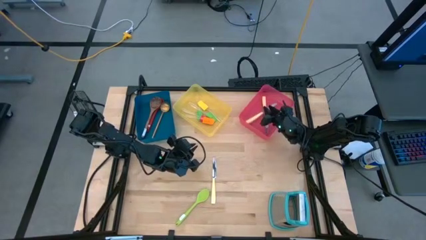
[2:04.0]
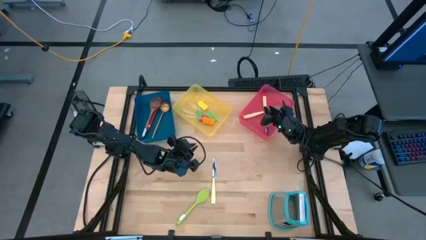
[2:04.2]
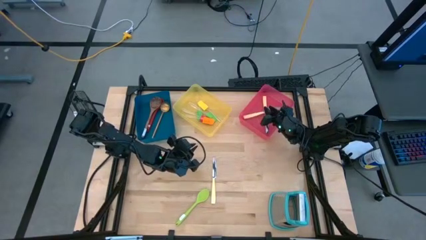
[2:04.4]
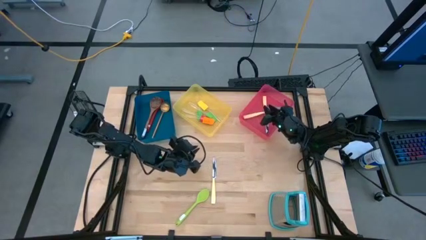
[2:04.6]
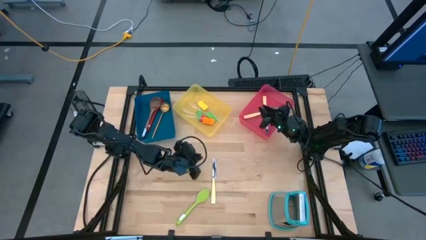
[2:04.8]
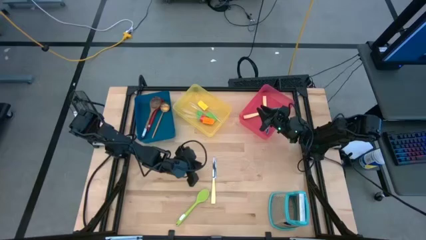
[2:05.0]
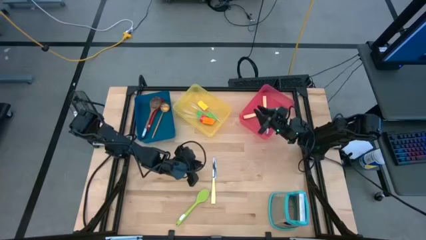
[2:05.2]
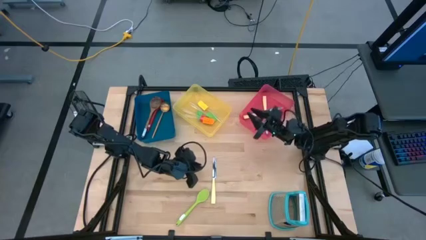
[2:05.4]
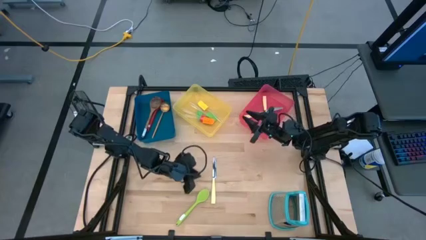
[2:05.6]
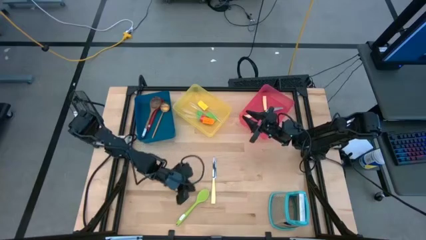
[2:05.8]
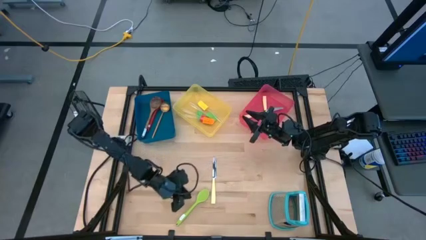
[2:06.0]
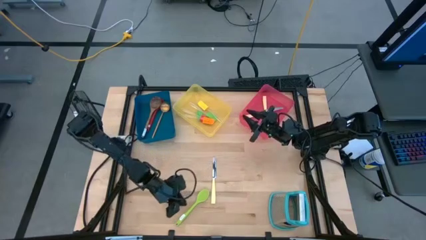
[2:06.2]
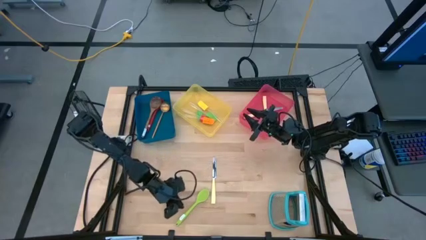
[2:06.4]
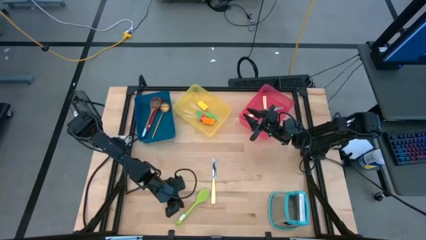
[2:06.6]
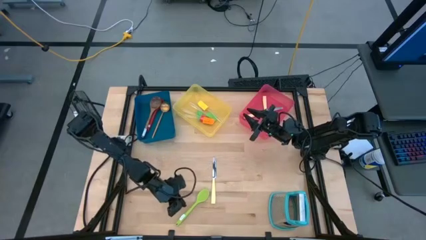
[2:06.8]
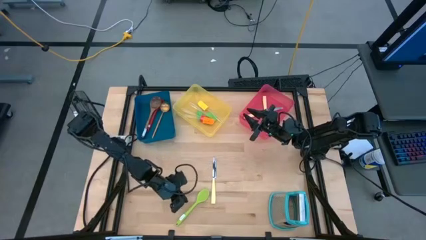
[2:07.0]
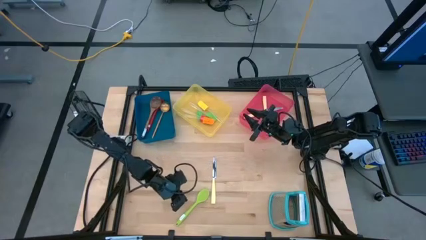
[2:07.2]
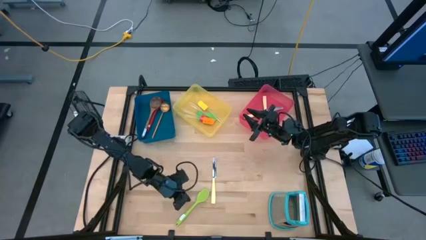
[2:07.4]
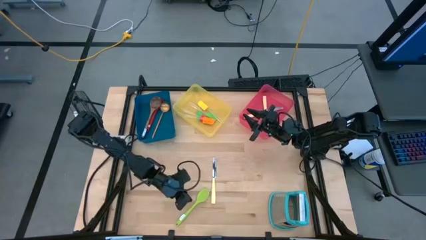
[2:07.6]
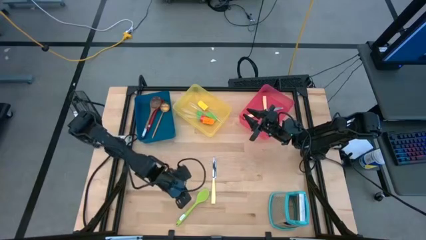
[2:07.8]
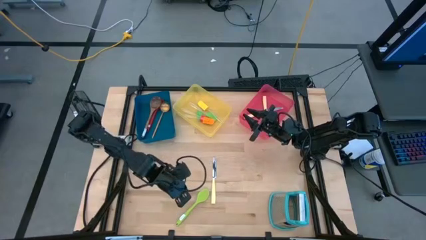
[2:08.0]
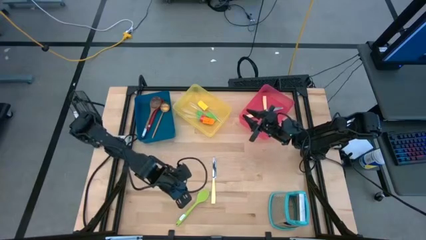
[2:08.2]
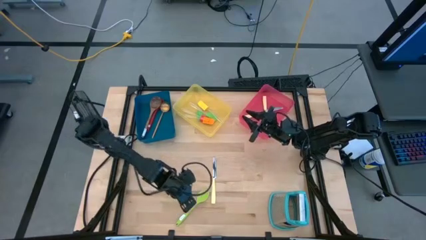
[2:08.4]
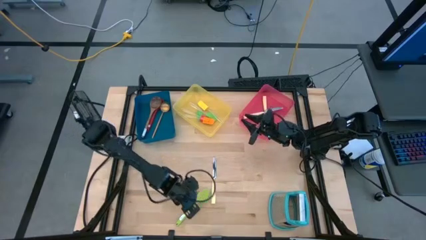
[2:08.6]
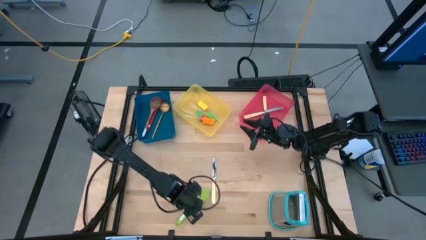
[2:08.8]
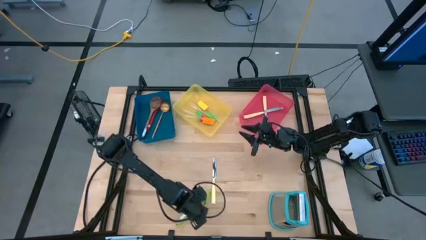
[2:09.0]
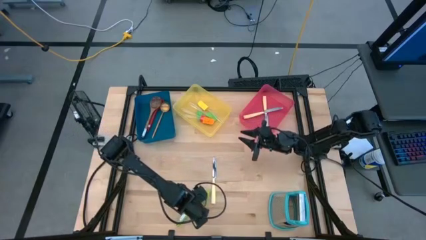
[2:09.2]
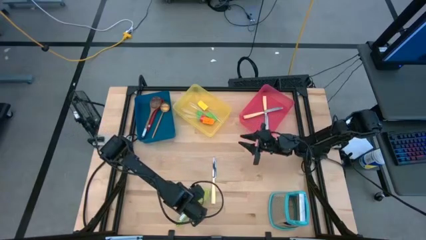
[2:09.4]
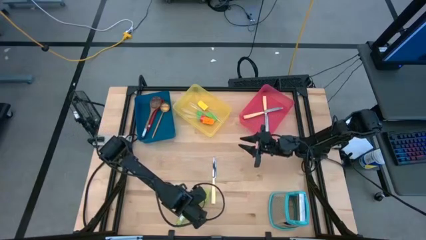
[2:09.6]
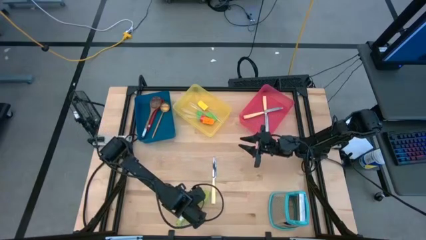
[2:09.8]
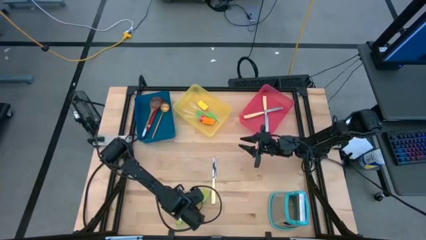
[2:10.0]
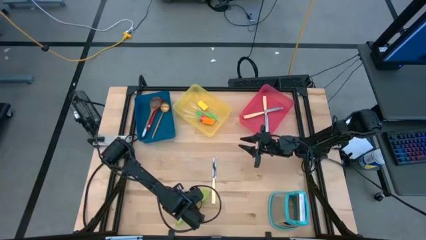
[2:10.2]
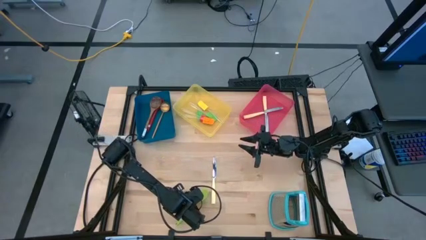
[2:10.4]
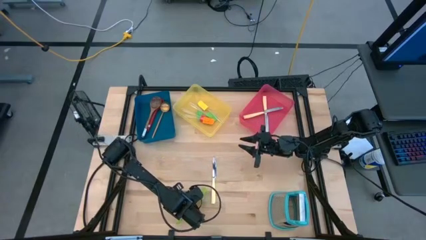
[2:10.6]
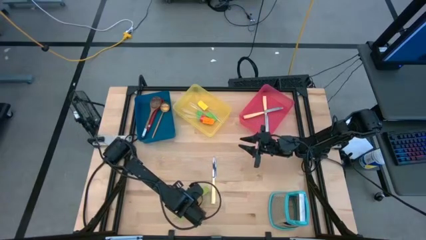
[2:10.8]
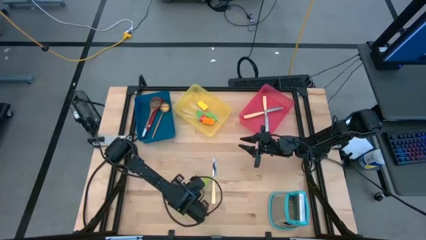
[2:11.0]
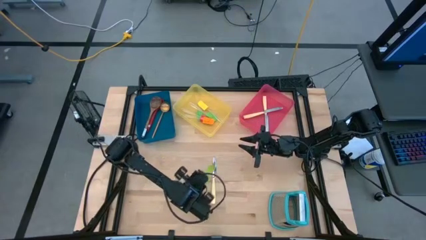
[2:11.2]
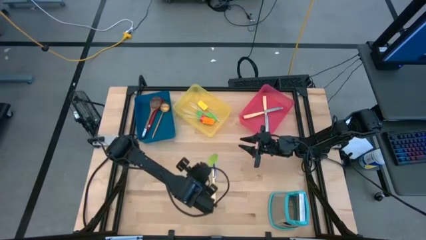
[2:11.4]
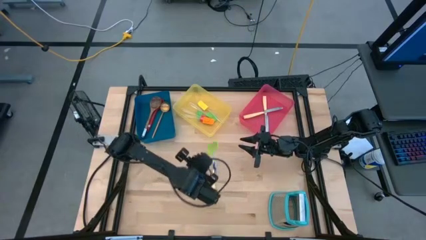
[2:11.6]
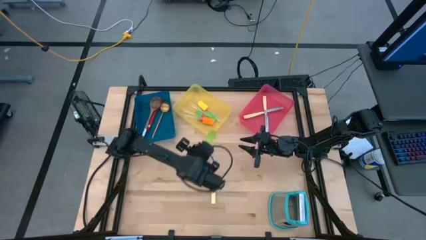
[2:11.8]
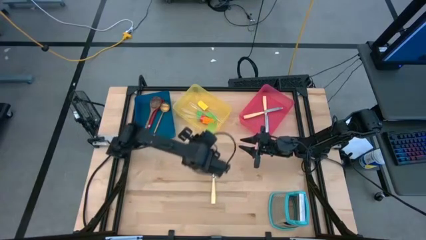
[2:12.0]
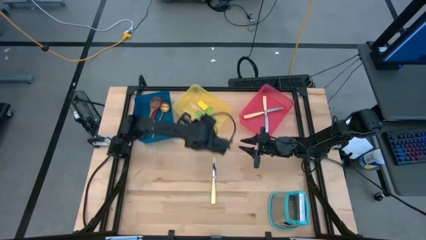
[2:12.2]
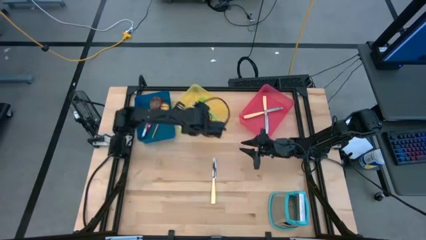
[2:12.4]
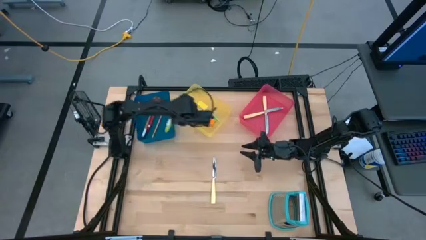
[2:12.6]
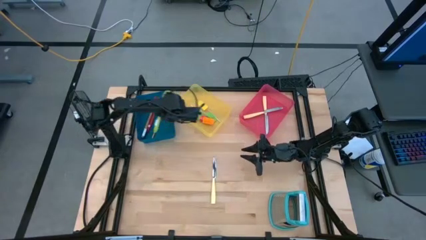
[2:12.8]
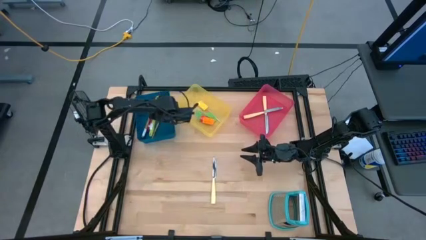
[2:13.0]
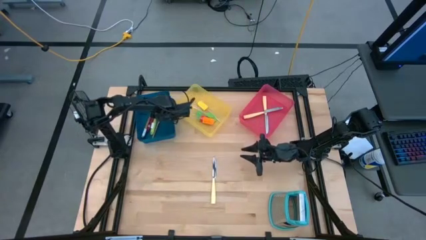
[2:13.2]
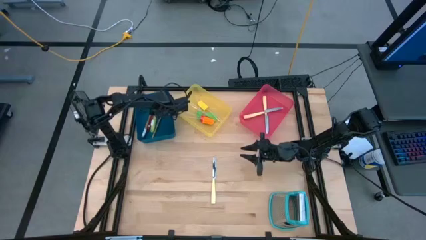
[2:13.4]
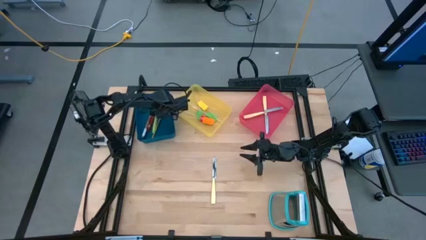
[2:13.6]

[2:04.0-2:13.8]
Task: Pick & Place Kitchen Items
Put the green serving spoon into the blue bin

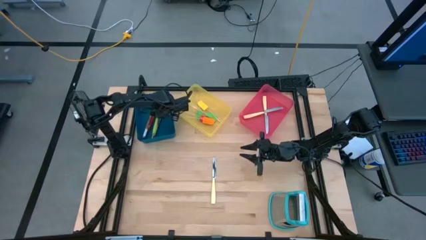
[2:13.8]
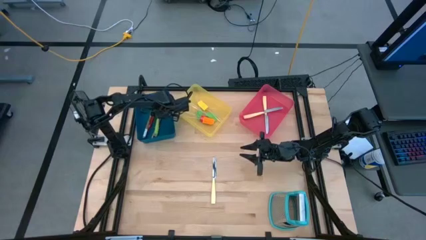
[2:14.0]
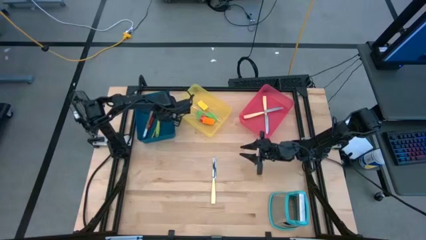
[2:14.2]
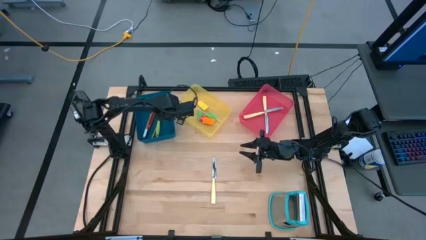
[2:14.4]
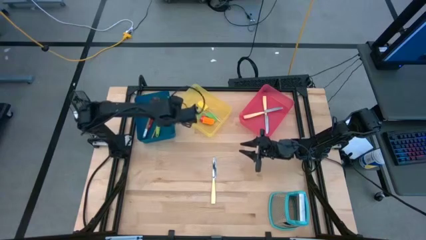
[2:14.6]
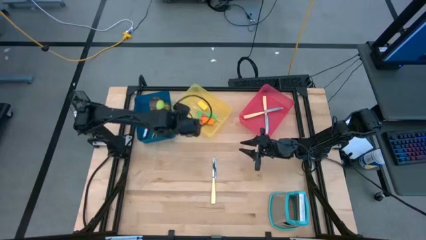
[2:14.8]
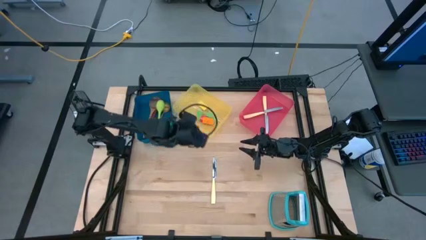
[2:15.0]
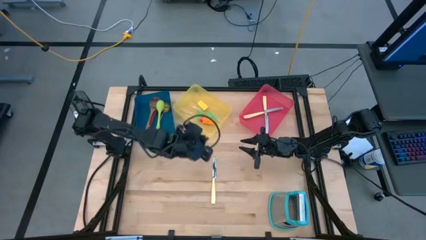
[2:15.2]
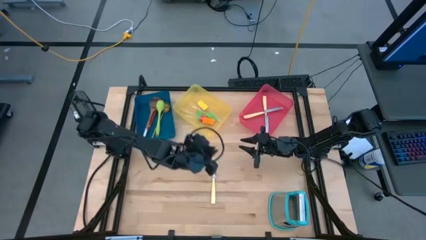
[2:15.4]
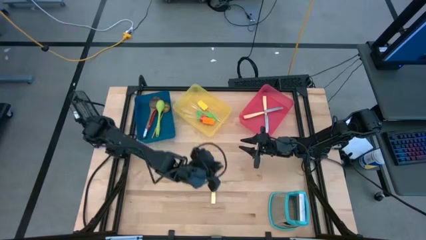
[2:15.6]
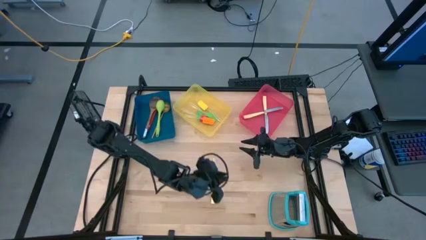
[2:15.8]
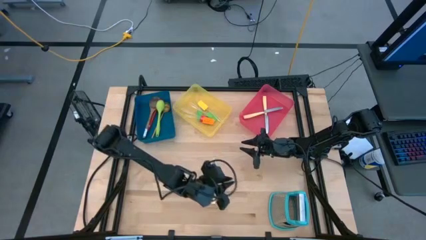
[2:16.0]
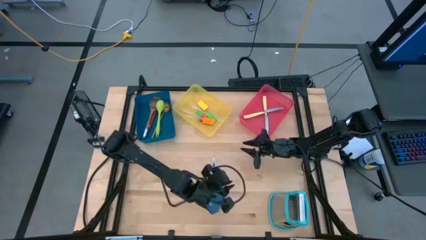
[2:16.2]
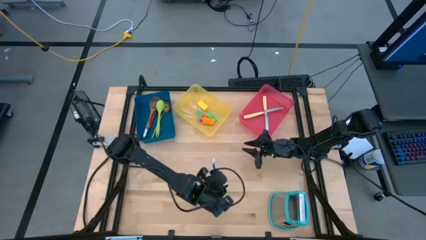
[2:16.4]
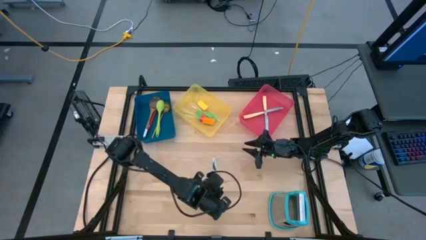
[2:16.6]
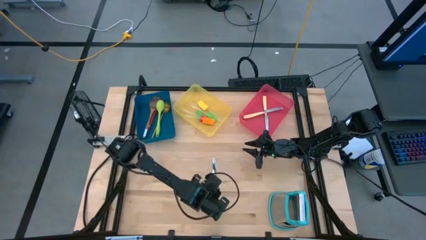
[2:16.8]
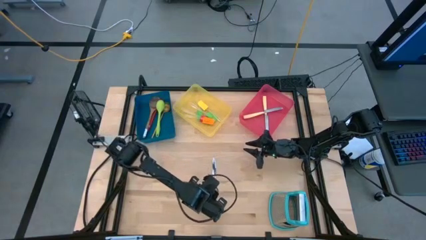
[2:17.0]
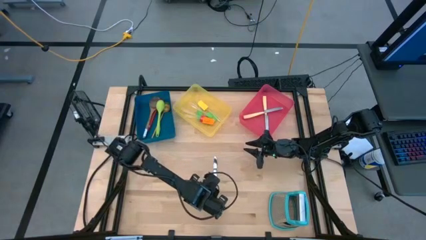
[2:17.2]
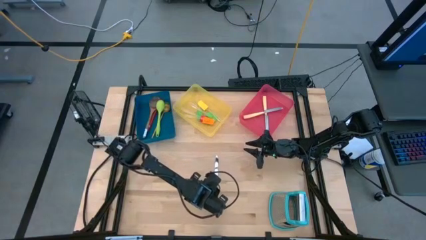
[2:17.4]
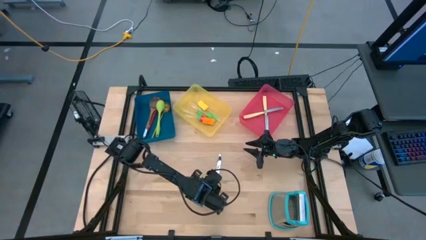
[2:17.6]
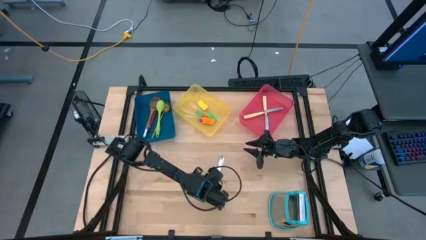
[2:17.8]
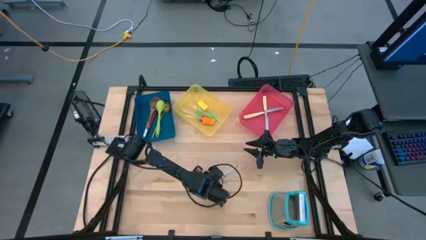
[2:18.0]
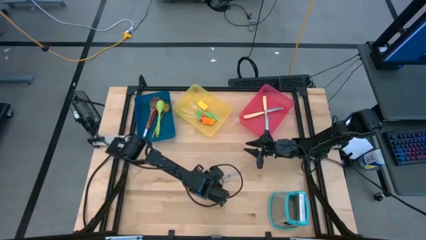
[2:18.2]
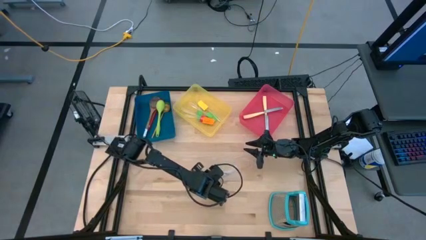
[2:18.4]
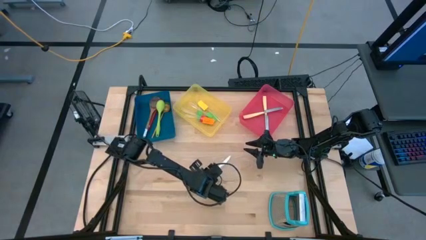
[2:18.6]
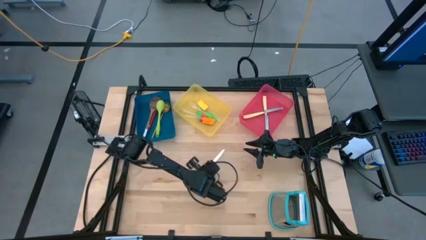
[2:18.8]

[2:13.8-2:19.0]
Put the yellow table knife into the red bin
